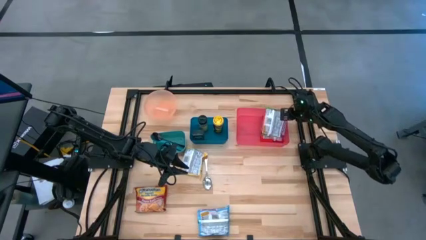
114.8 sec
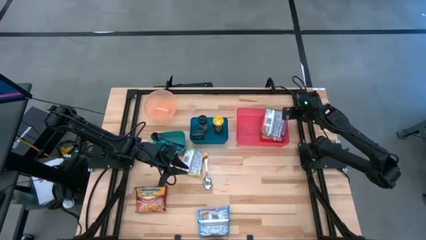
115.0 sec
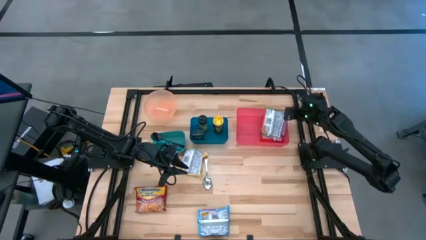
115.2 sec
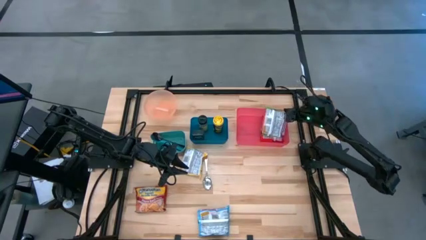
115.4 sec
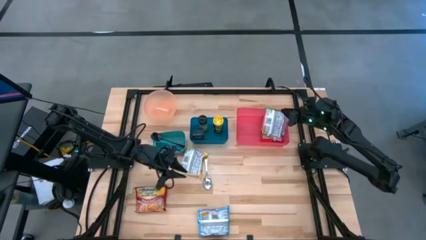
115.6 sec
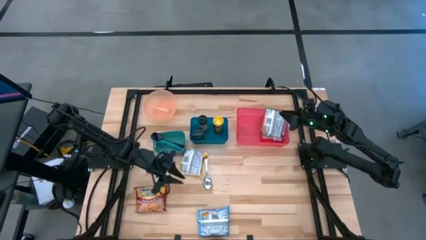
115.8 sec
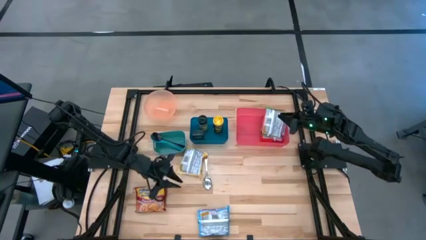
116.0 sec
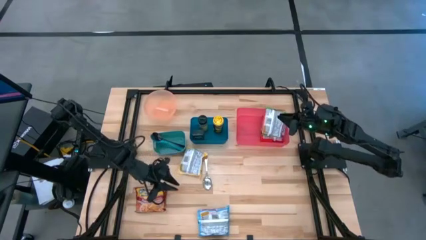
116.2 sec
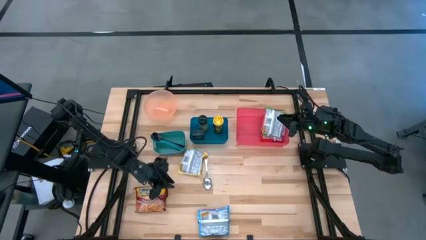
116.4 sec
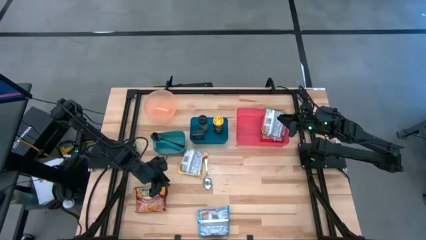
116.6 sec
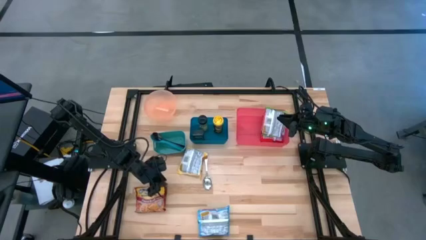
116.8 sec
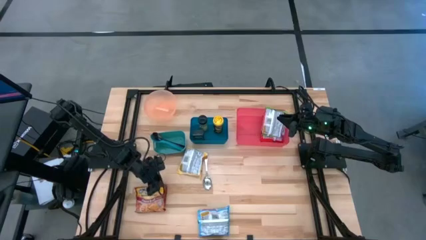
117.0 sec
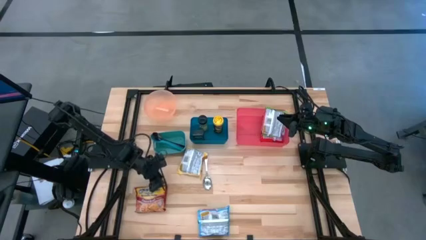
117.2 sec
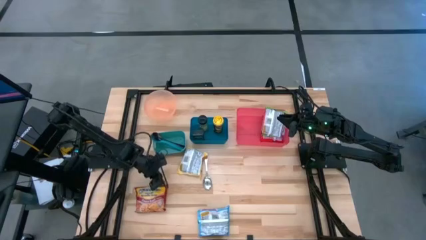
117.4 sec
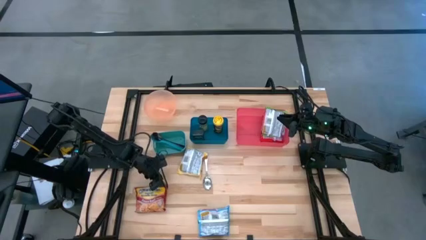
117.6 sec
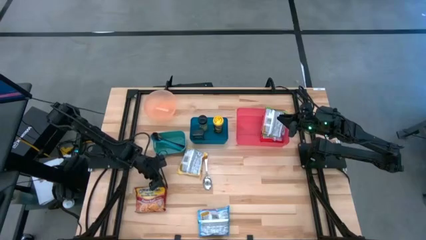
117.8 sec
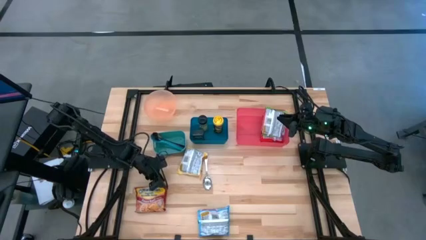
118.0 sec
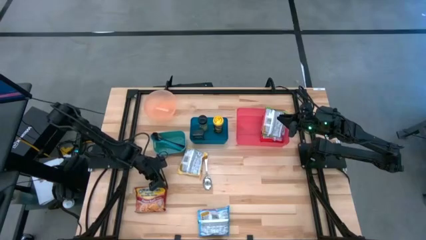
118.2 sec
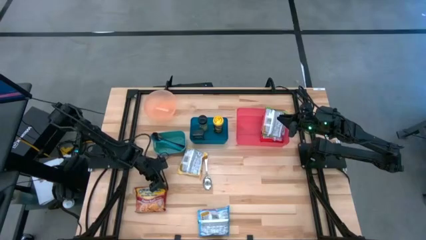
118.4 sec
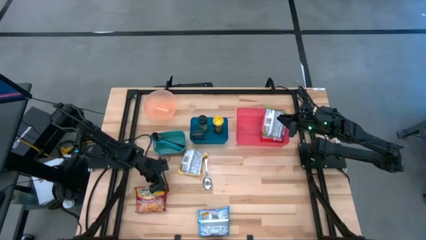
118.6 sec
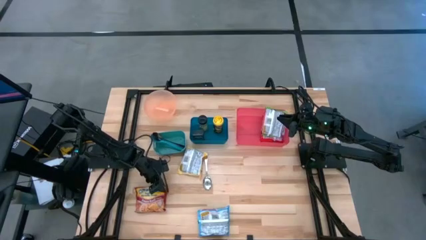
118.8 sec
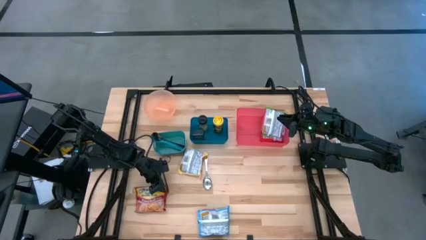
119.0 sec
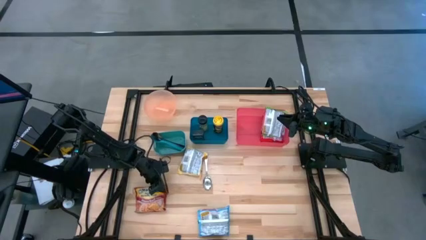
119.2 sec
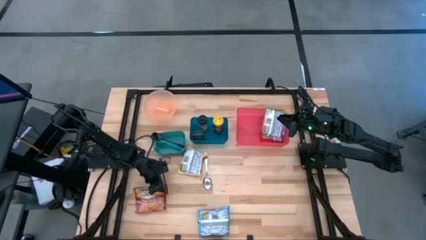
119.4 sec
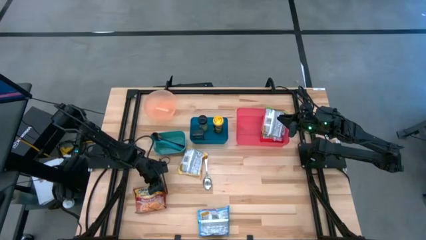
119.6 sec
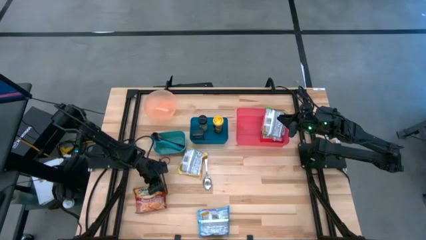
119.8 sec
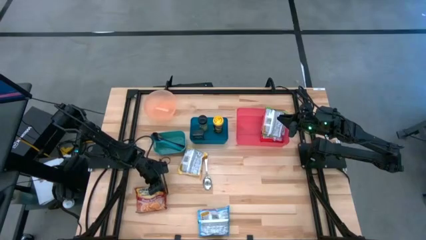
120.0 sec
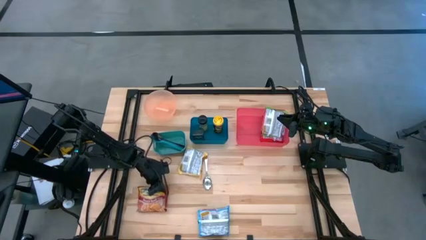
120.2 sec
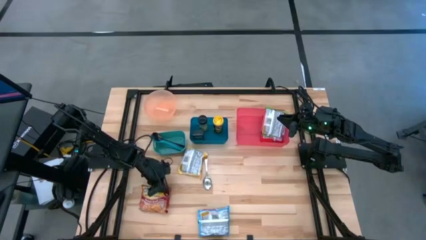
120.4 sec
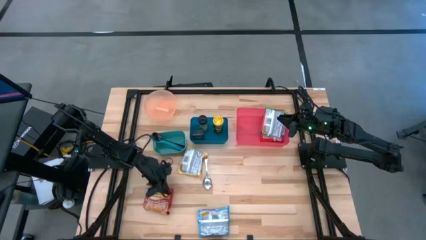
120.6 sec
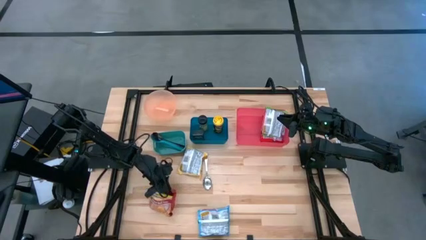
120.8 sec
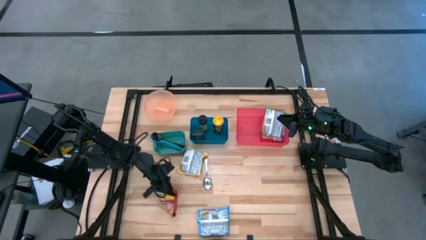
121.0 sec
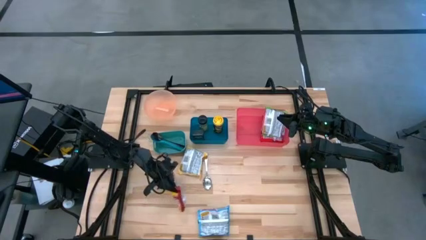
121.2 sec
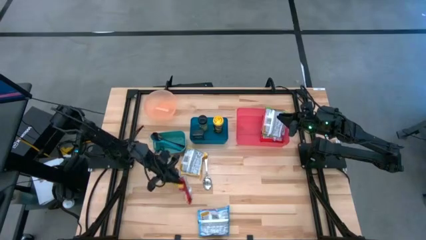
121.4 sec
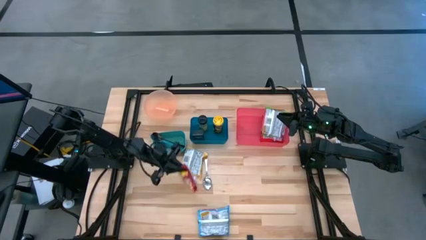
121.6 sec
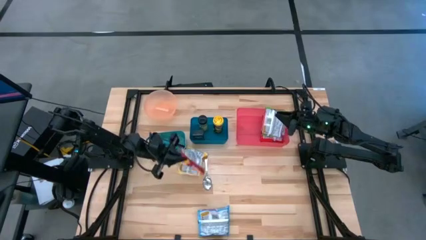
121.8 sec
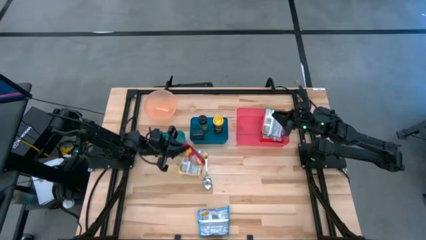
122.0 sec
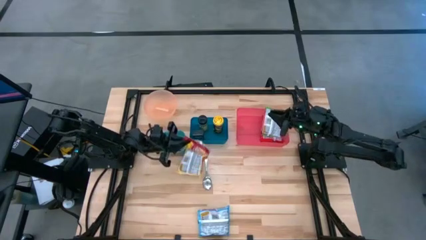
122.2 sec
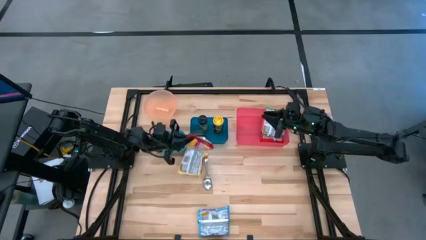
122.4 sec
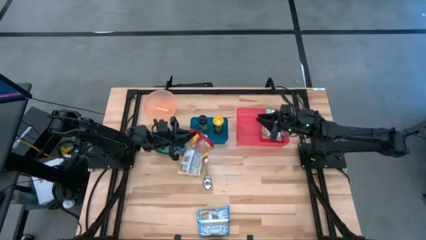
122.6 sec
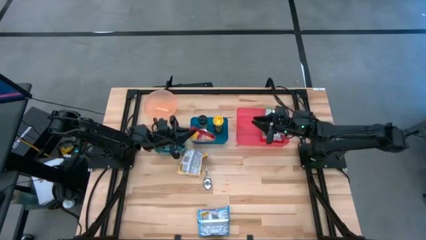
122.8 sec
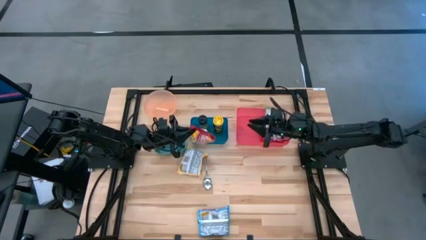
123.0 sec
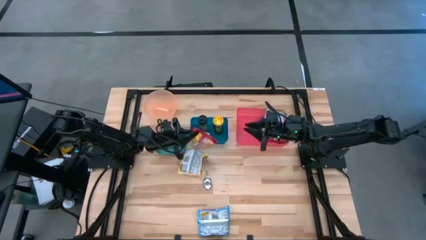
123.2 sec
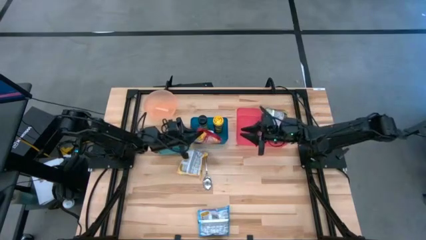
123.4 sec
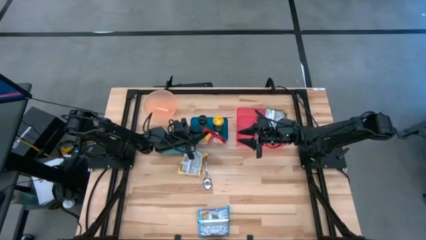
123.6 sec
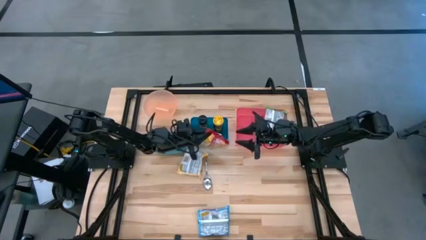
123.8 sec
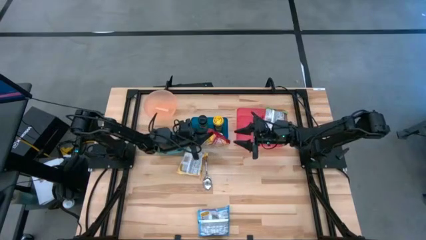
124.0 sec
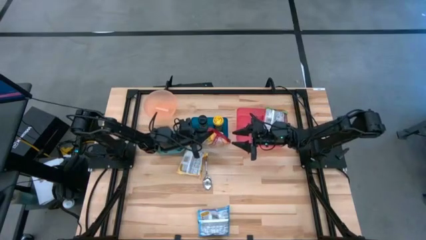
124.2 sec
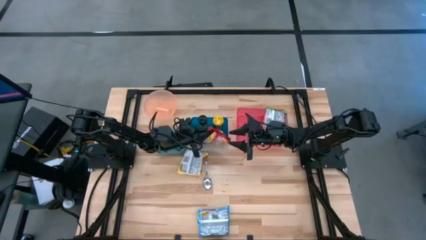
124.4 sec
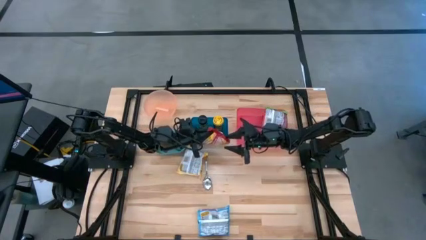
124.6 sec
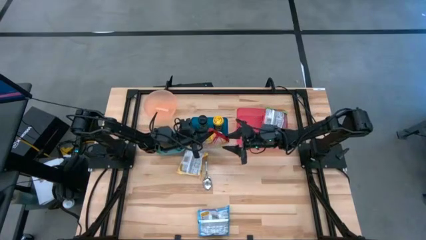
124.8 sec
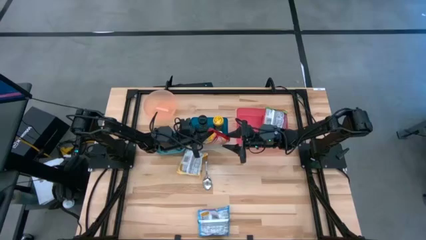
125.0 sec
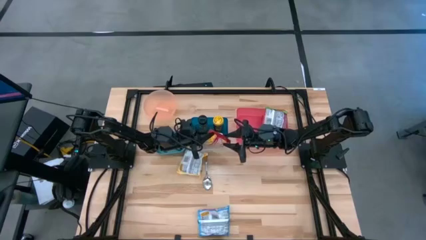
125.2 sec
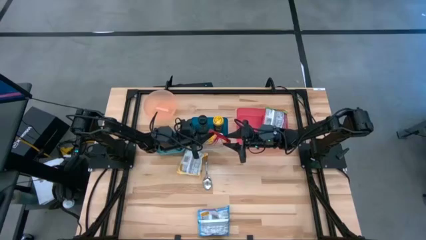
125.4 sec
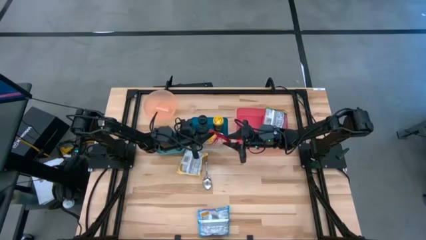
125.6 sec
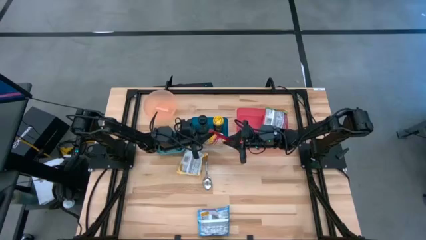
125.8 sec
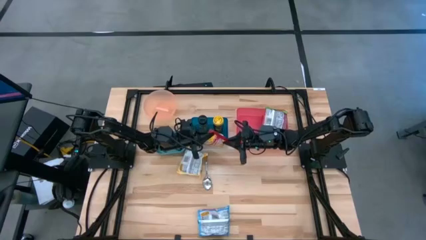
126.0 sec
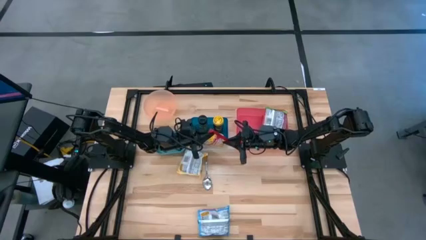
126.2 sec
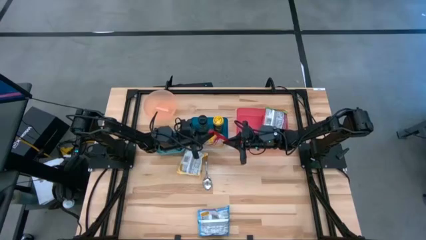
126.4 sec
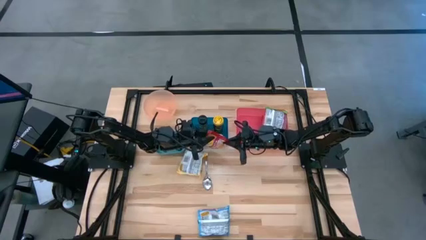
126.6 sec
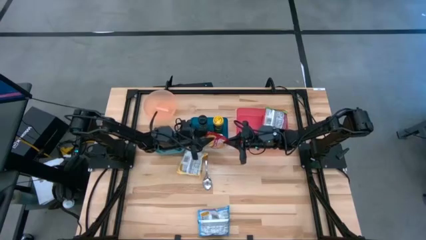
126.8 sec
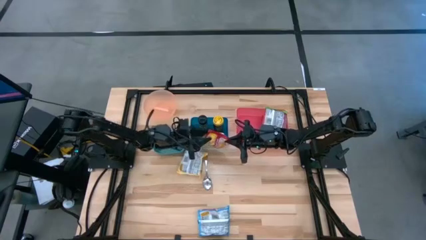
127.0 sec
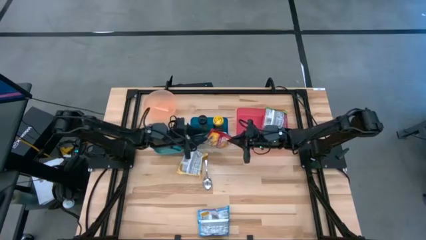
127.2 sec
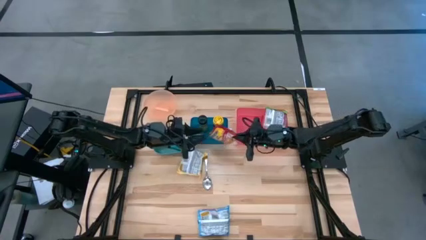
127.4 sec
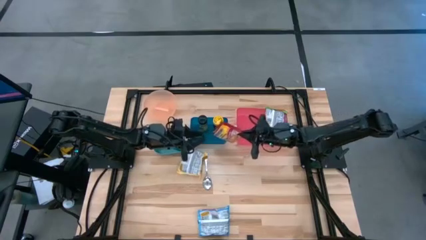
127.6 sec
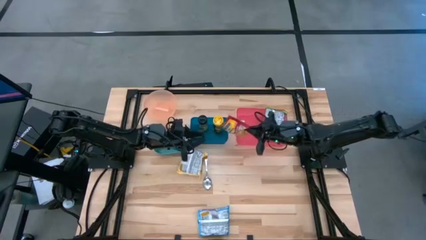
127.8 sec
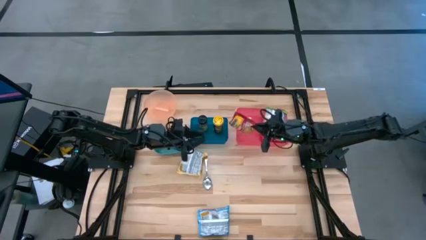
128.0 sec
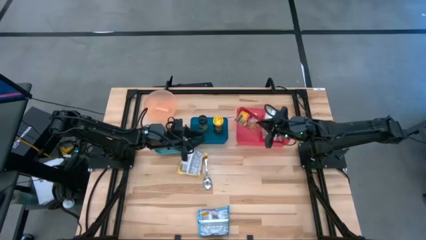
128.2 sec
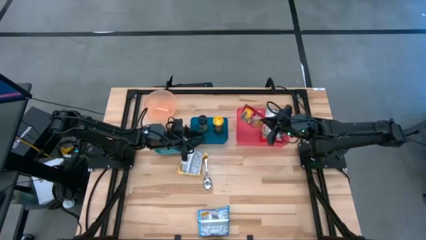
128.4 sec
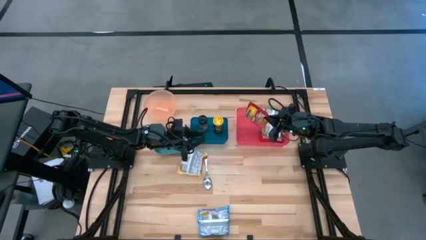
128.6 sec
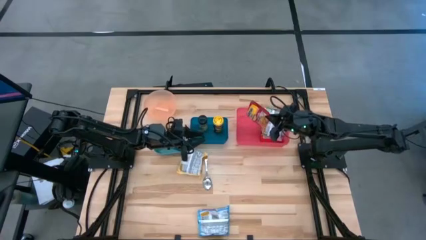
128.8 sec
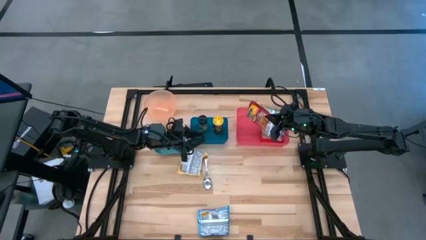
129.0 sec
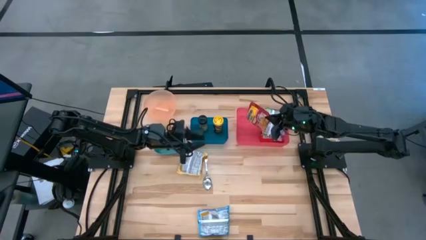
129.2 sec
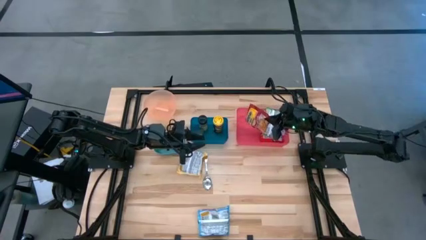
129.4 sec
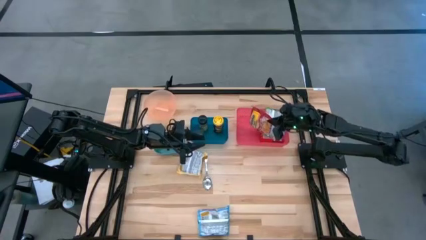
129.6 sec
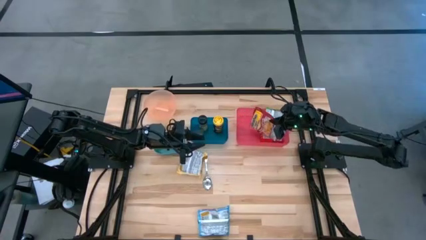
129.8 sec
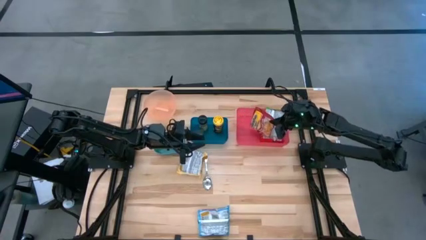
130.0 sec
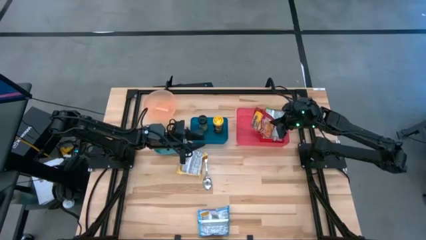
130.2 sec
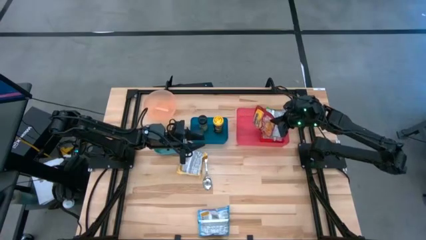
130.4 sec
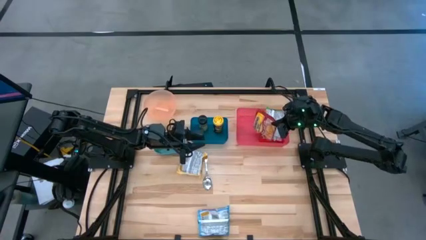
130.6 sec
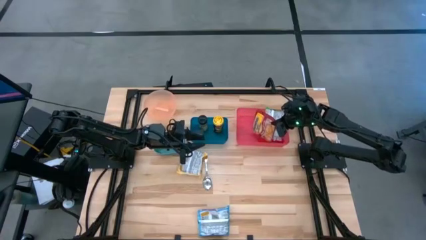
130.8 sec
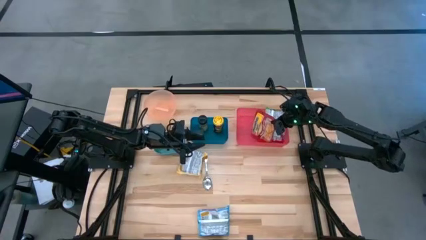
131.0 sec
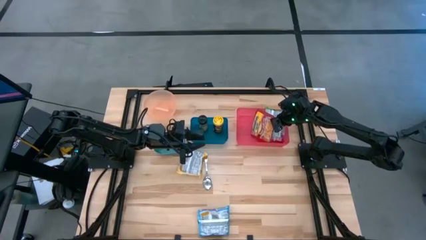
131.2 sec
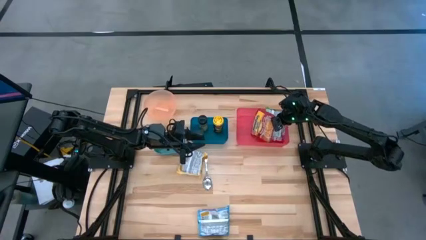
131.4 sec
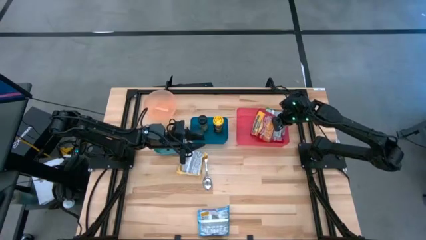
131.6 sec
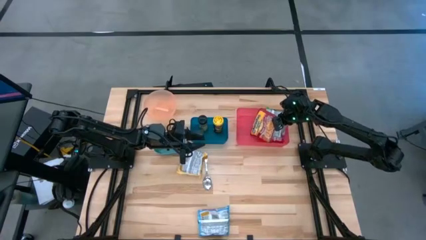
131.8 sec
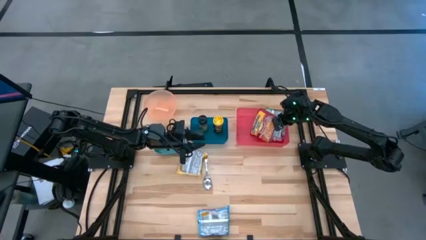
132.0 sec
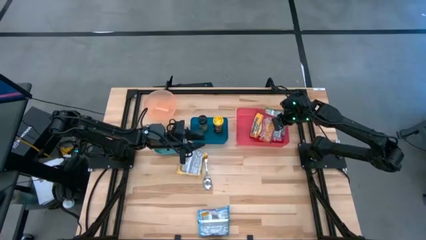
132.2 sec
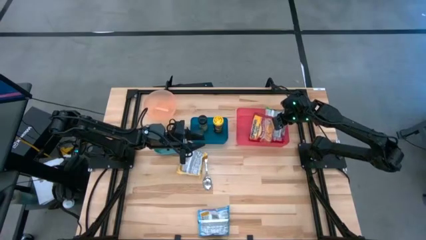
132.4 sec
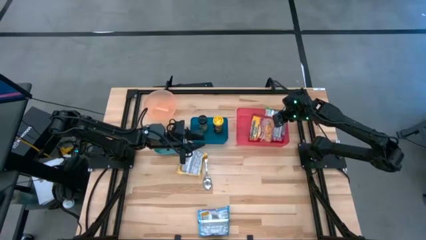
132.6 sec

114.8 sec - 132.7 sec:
Task: Pick & Place Food Item
Put the dark red noodle pack into the pink bin
